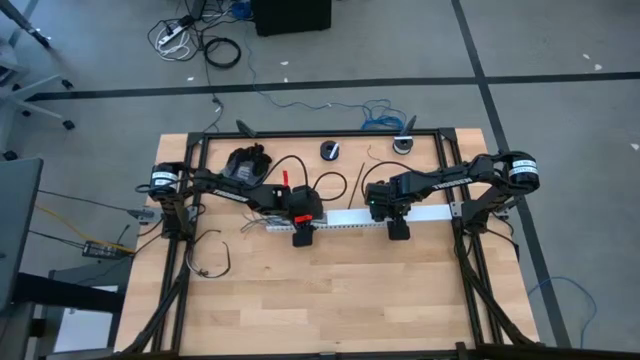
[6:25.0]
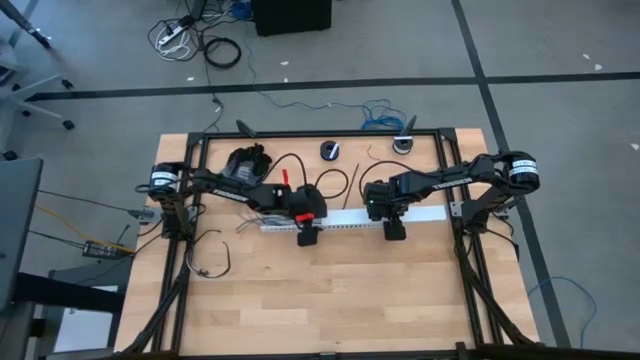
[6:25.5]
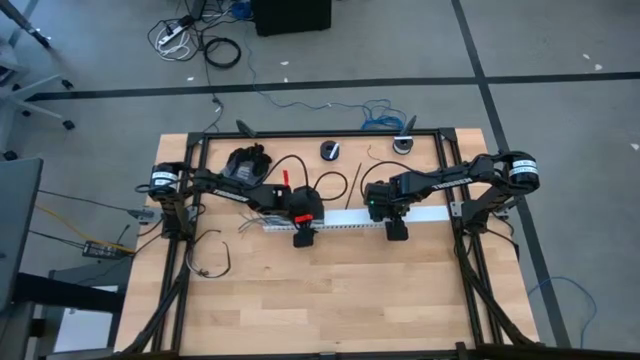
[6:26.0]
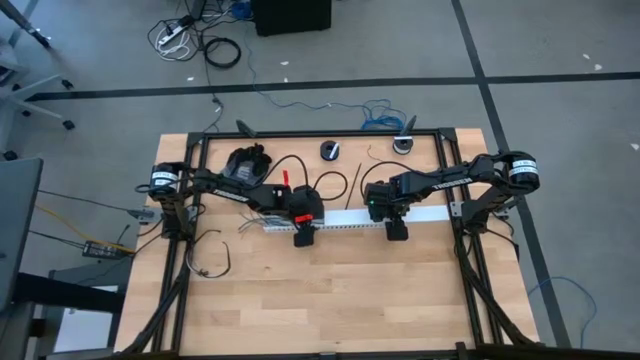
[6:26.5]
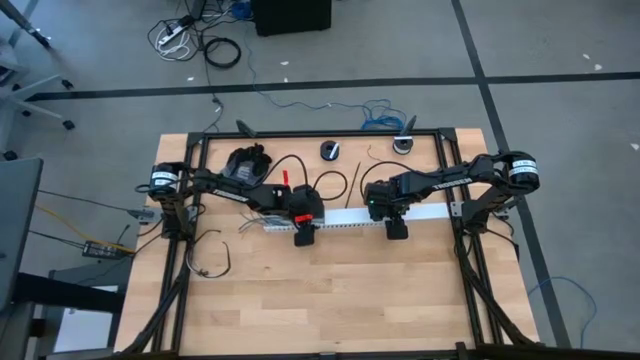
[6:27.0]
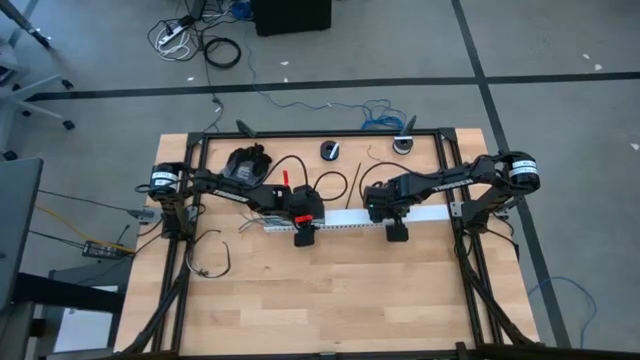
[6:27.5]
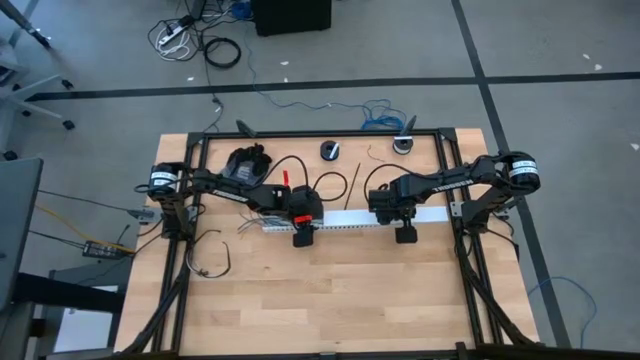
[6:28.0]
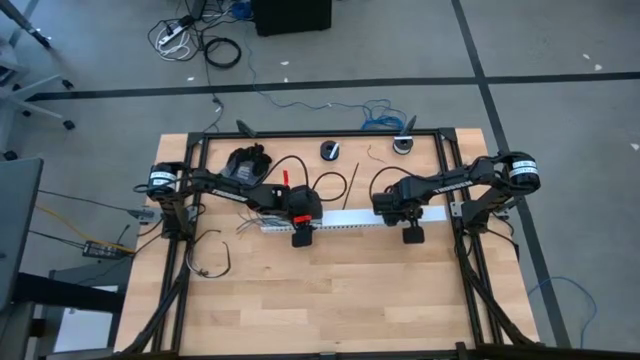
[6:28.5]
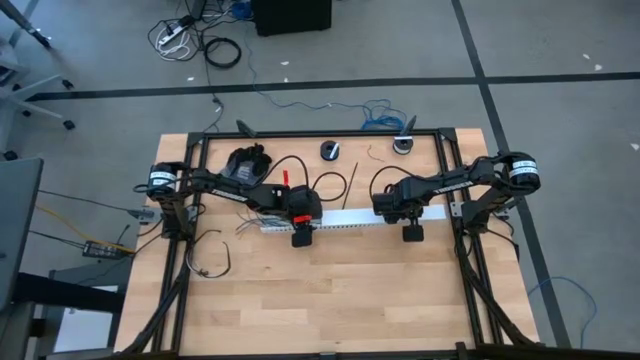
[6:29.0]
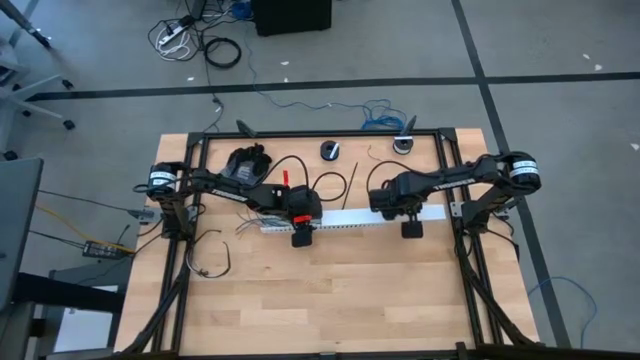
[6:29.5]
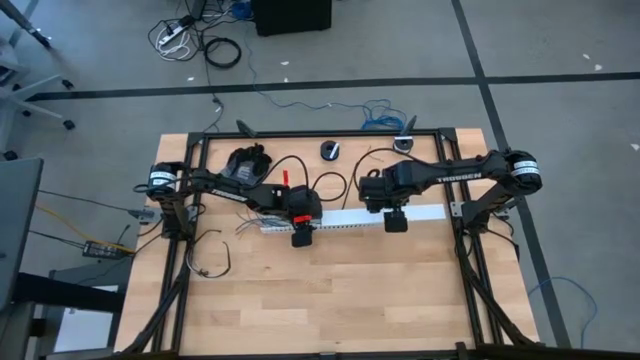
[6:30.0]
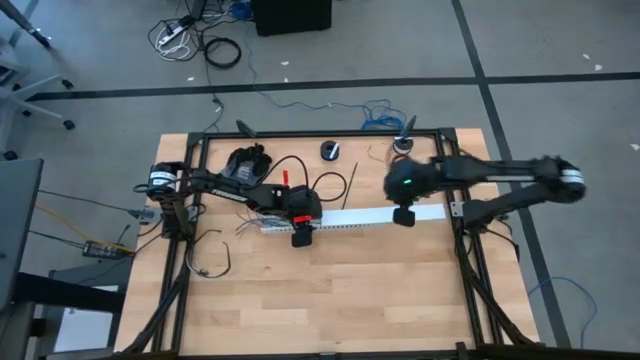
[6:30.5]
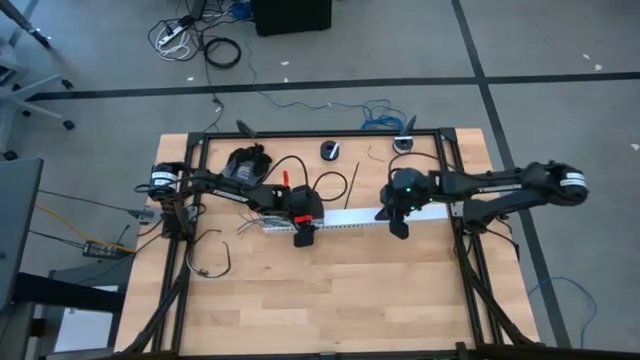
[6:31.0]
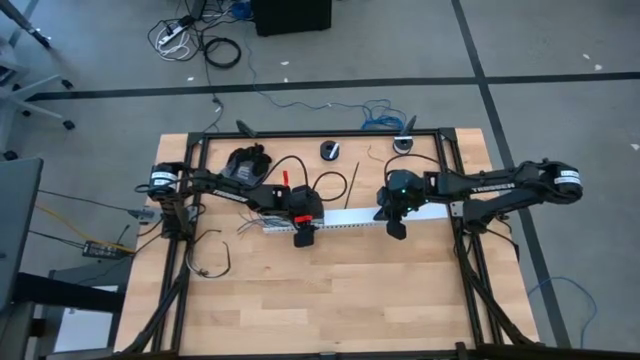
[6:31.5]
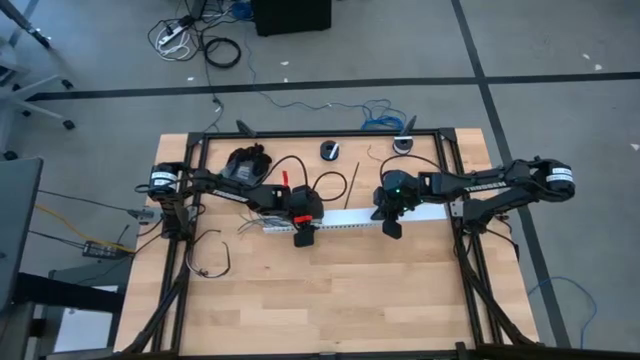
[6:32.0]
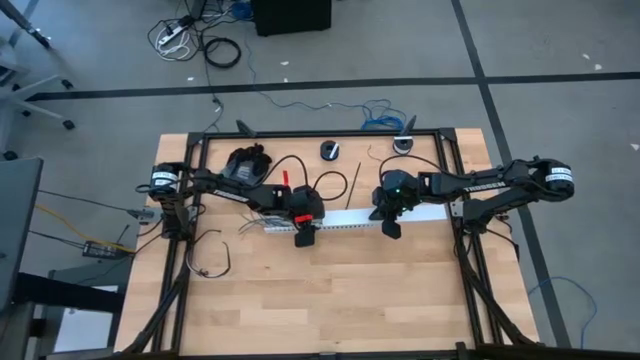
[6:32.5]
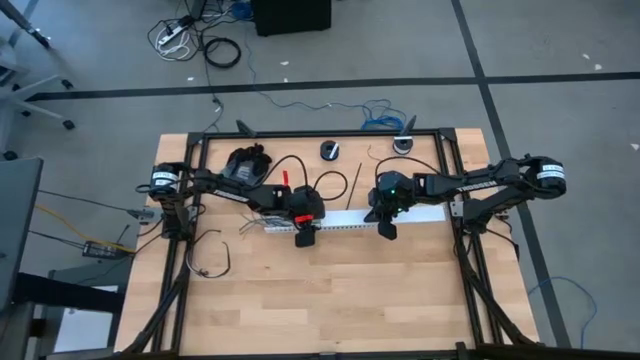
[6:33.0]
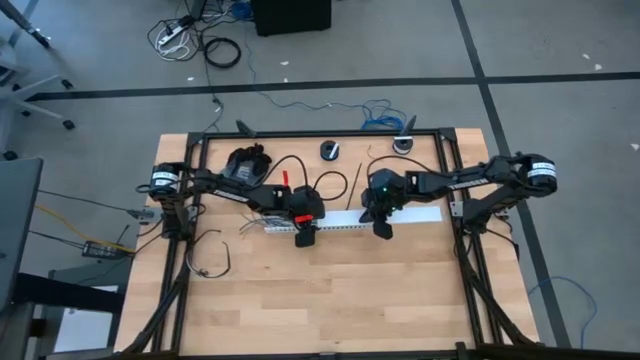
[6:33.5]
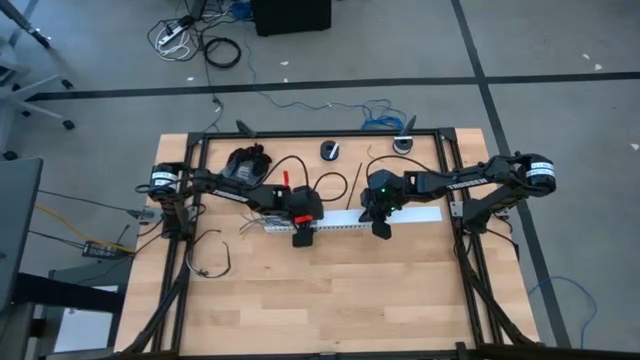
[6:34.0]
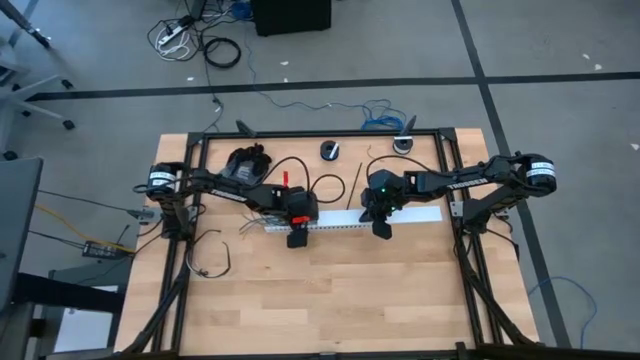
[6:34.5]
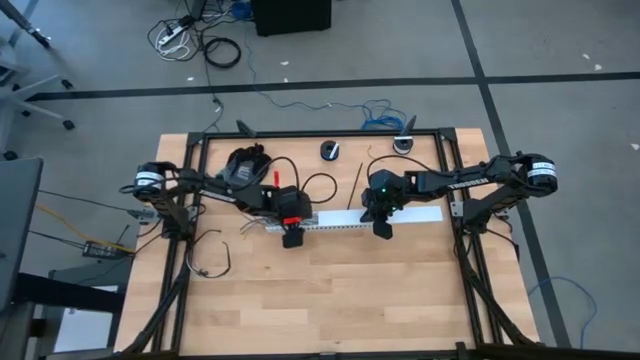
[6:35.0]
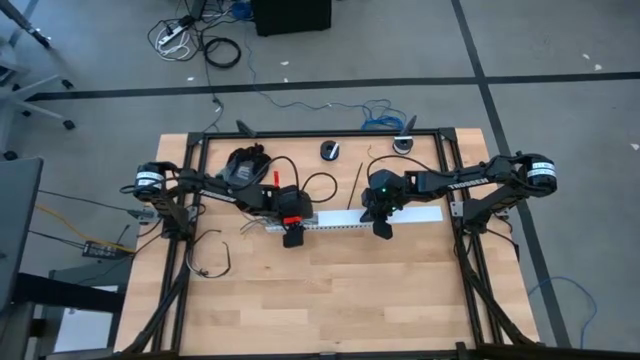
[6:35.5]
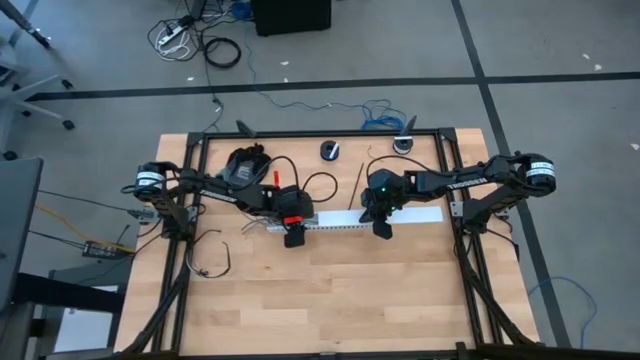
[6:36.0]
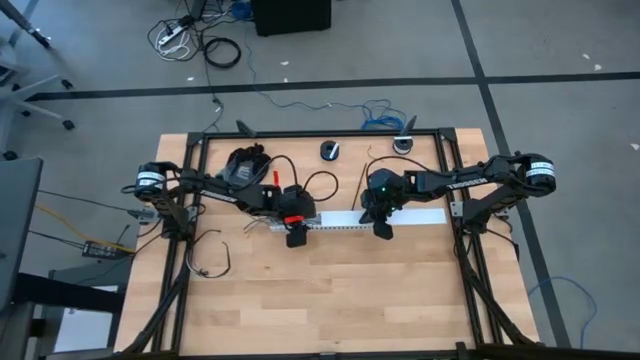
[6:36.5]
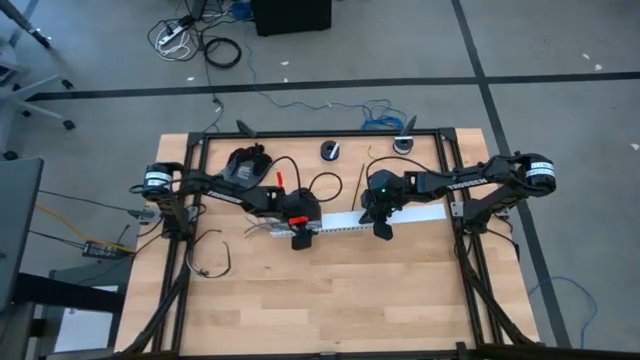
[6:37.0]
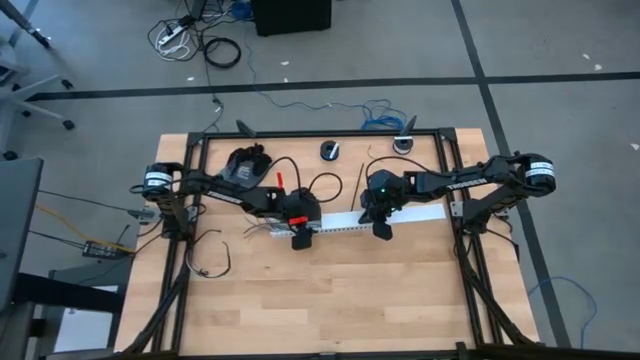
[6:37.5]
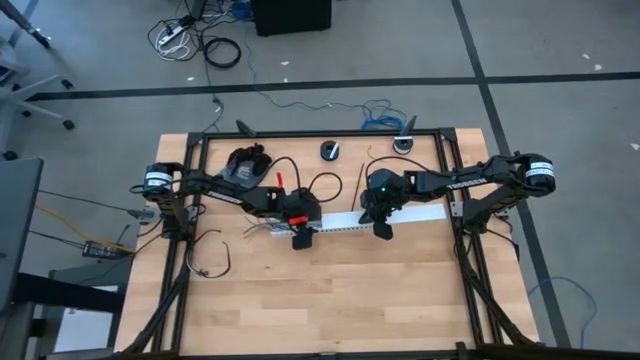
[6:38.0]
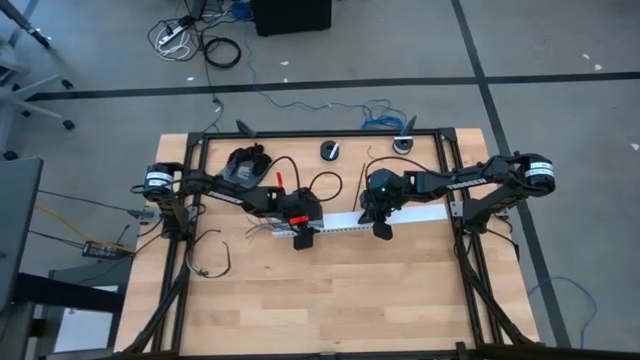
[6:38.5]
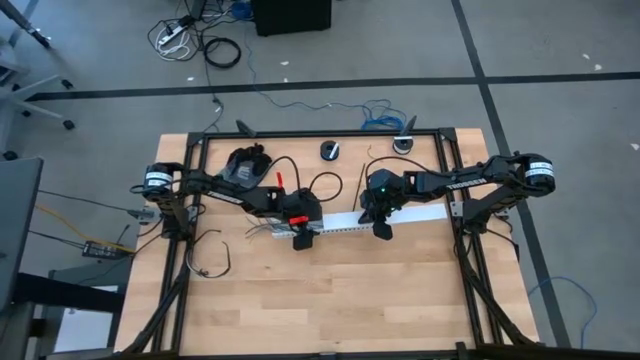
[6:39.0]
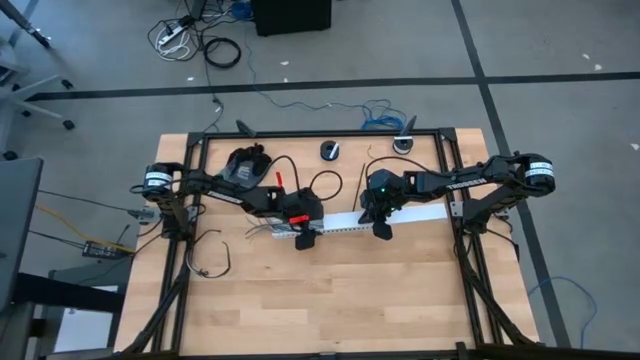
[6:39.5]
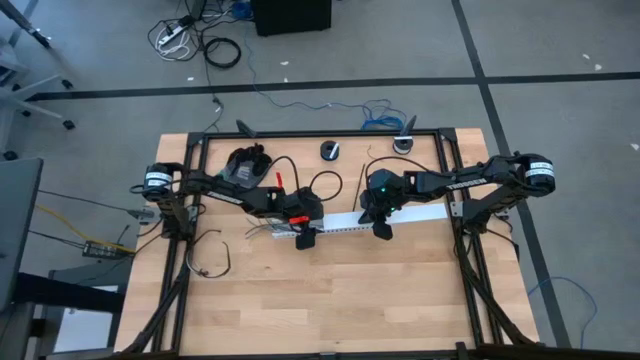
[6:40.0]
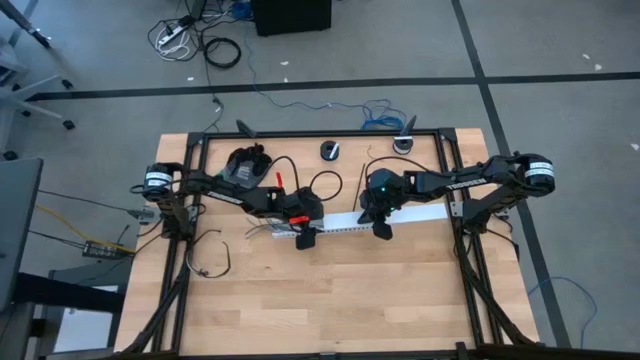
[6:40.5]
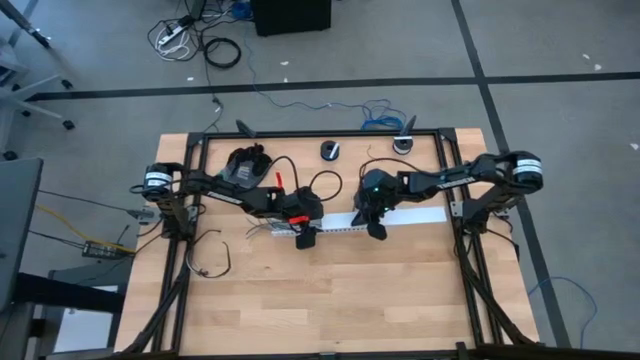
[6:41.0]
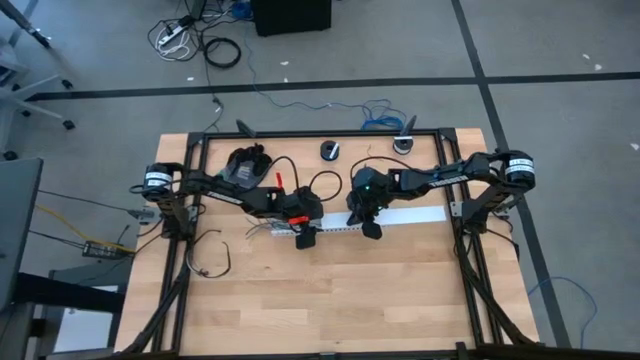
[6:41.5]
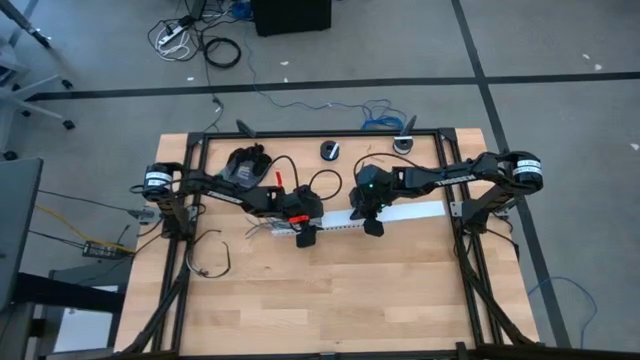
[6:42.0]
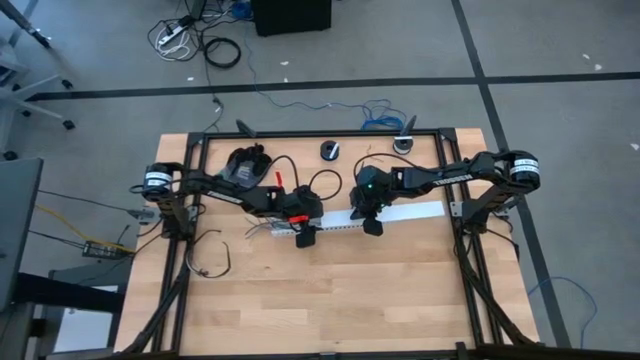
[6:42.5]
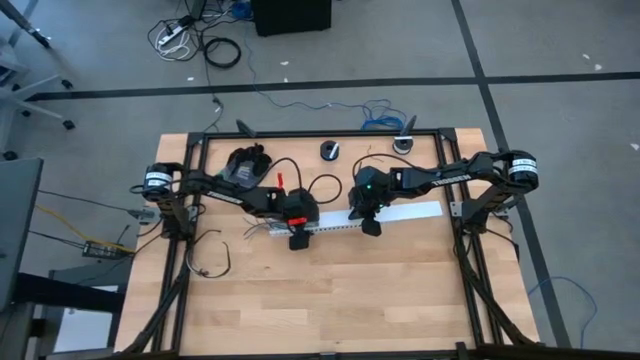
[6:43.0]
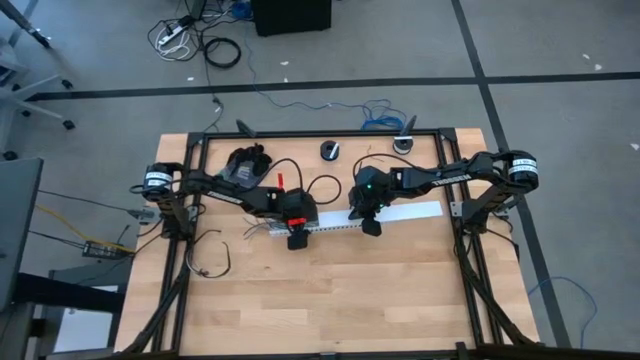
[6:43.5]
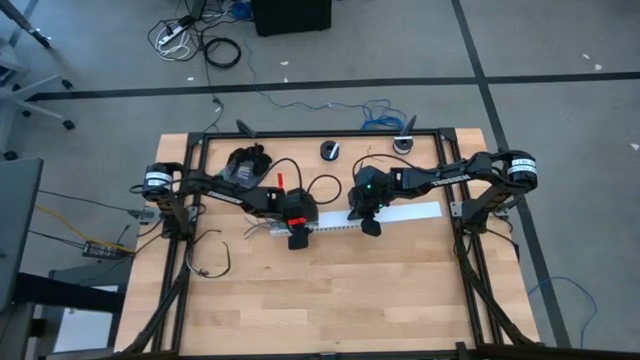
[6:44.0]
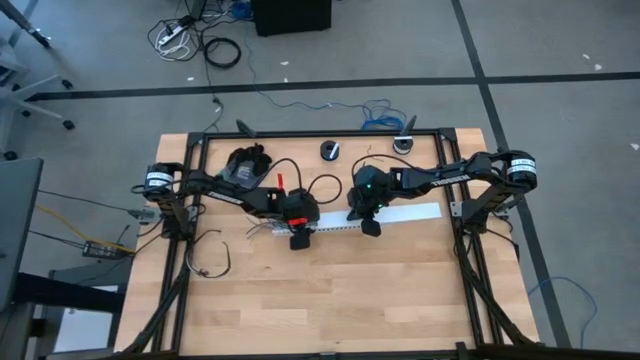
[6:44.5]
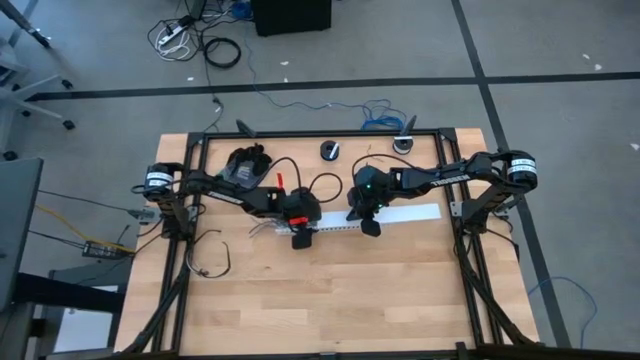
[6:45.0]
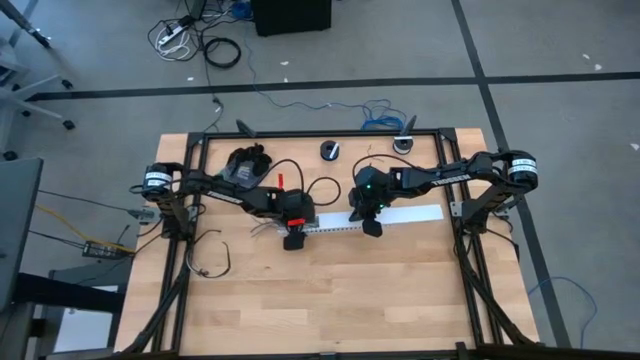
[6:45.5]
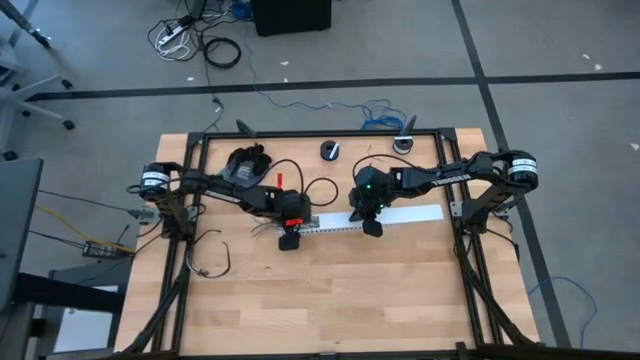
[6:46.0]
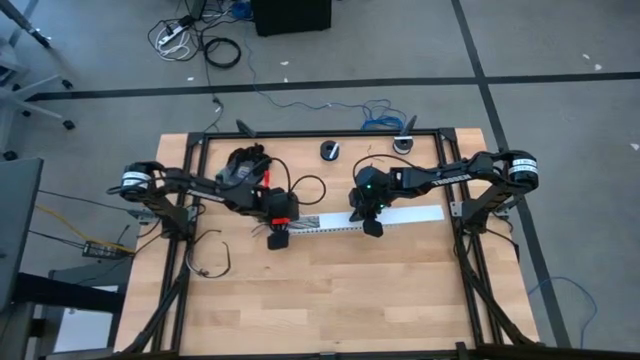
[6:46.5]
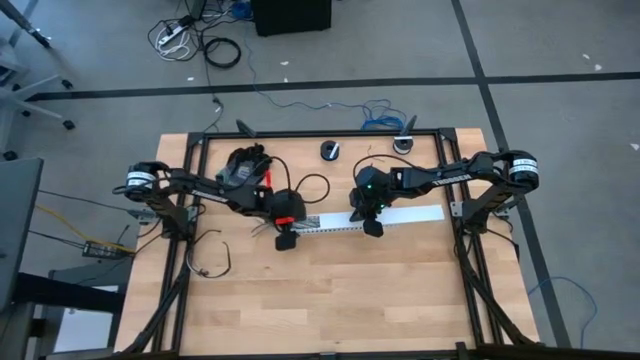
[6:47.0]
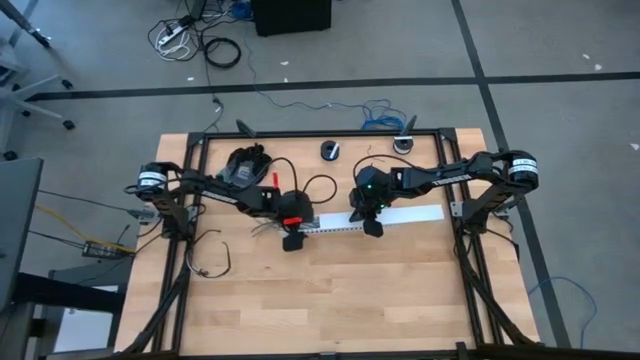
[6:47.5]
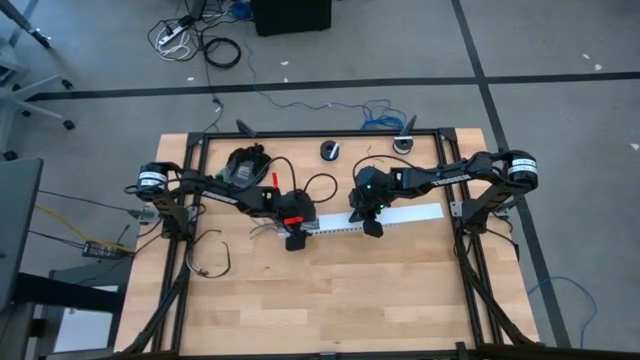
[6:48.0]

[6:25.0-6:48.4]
Task: Ziptie cables
Close the white cable duct
